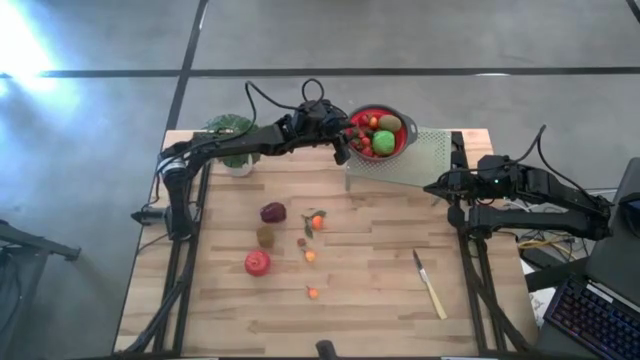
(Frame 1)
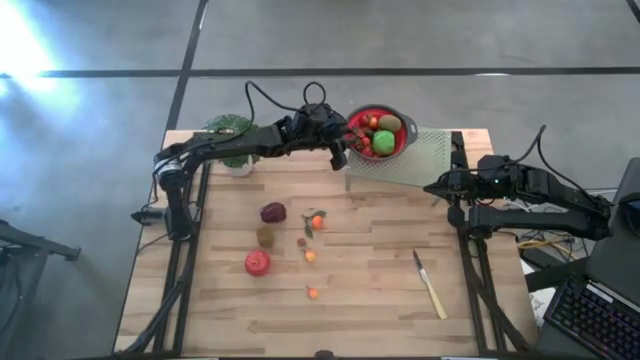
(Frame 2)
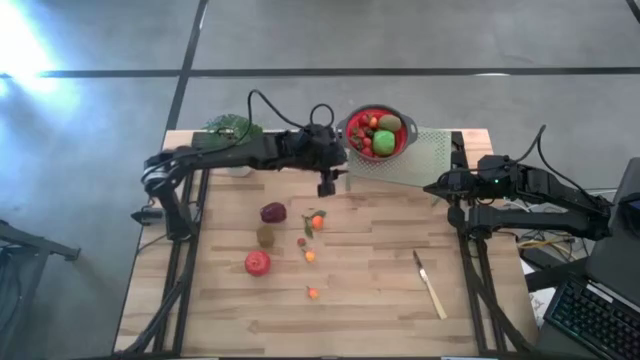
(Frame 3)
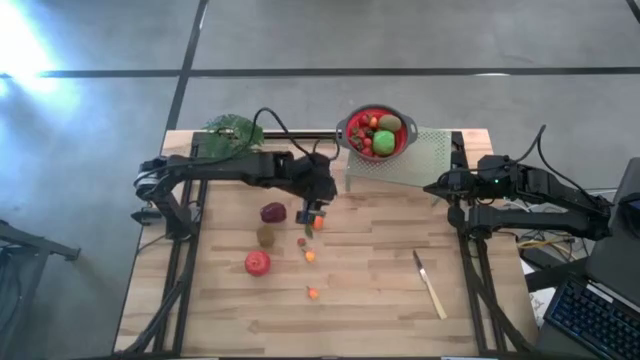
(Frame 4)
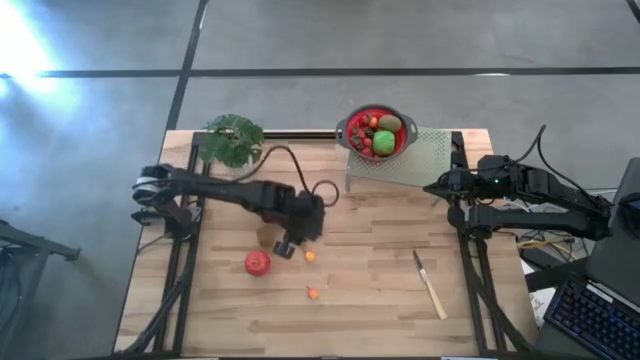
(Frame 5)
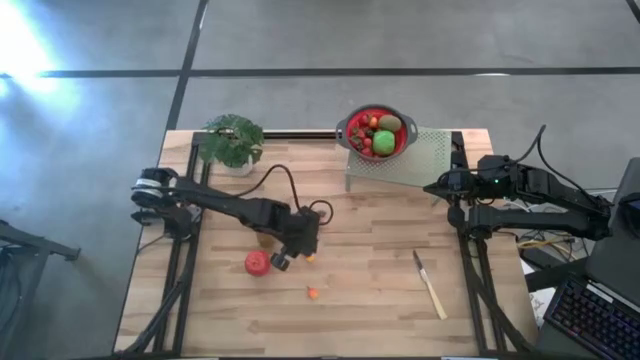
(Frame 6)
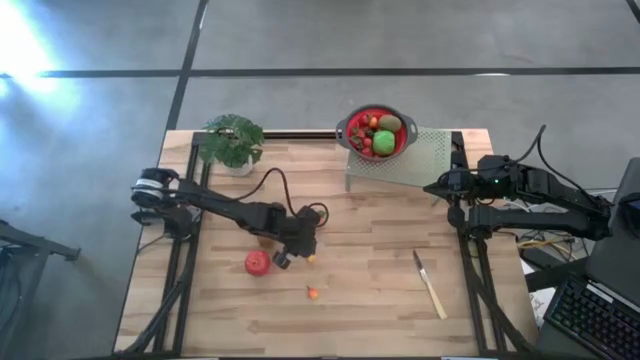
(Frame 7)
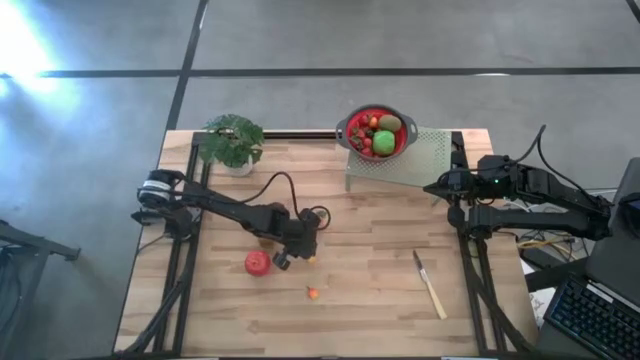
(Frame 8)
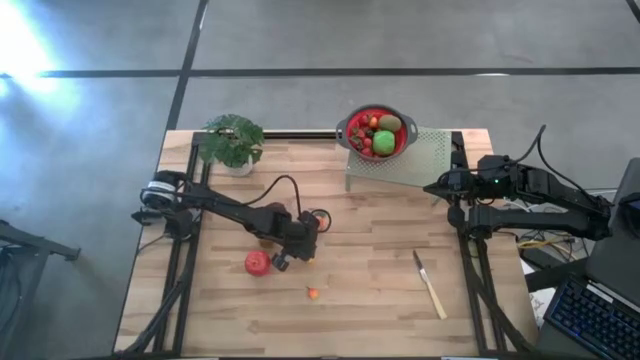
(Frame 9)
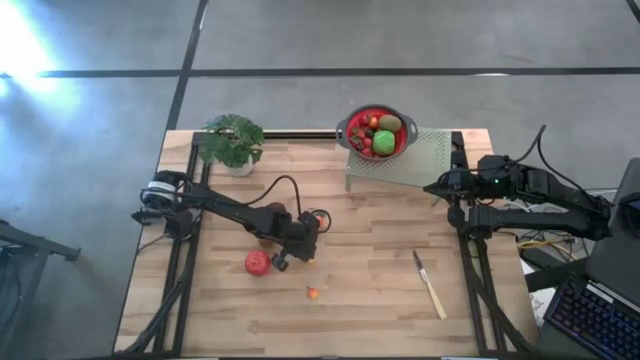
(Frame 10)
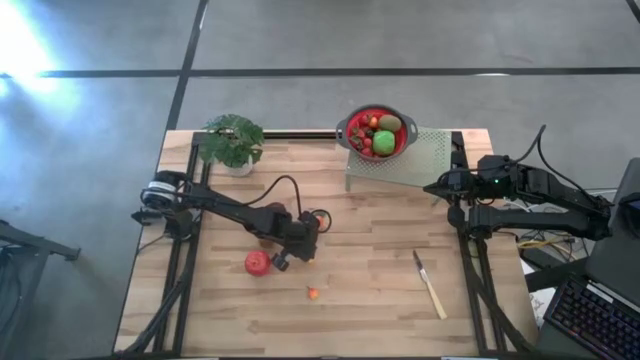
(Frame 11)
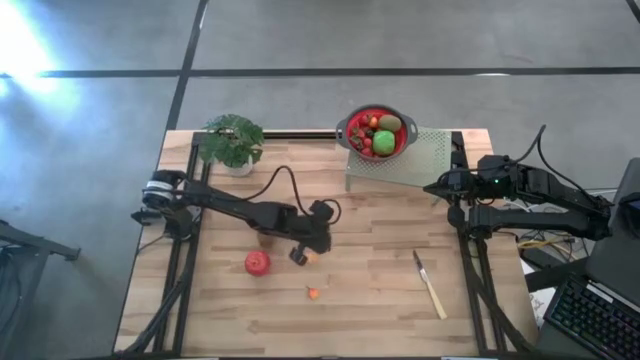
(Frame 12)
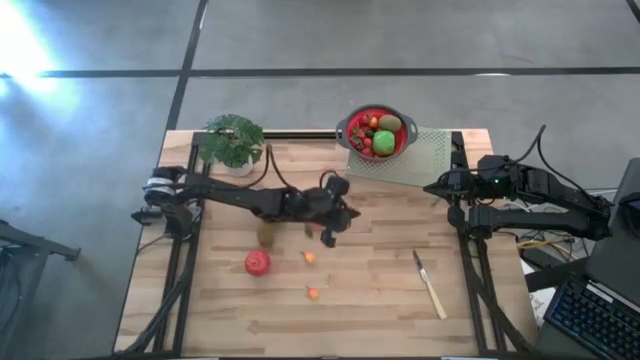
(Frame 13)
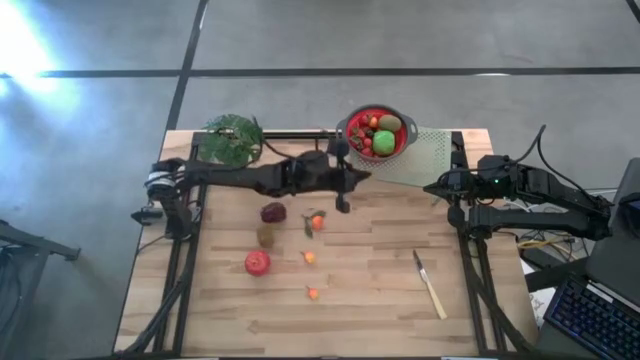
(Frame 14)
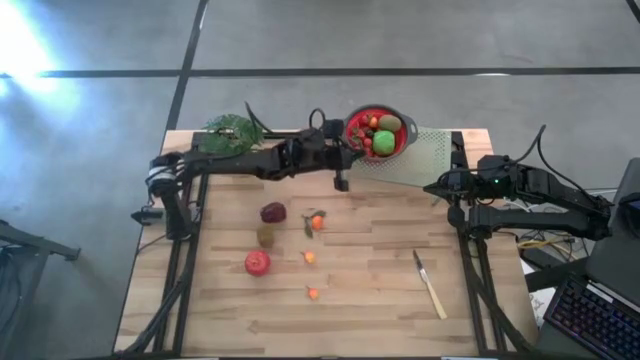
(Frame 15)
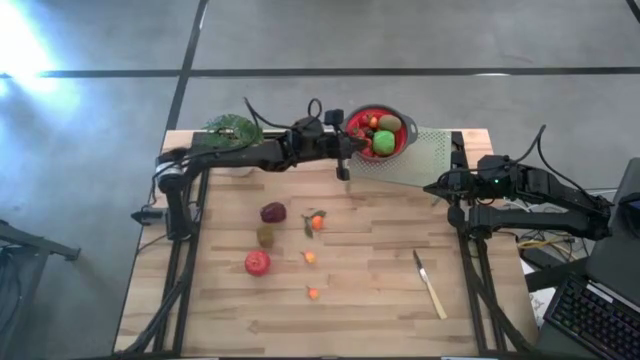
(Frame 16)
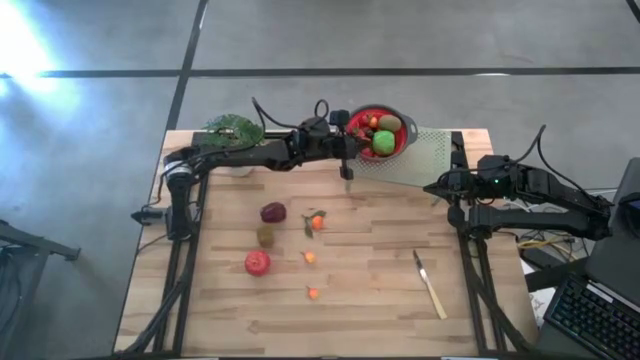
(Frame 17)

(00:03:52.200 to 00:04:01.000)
Task: Pick & Place Fruit
Put the strawberry into the strainer bowl on the shelf

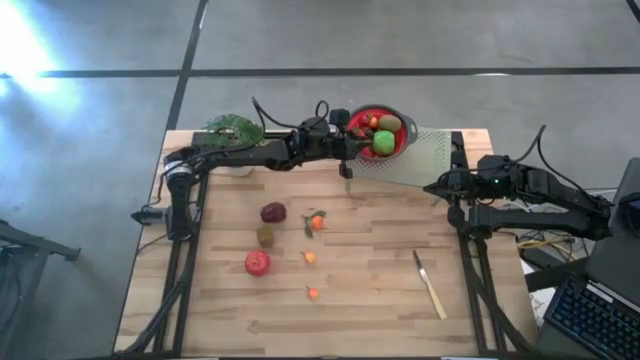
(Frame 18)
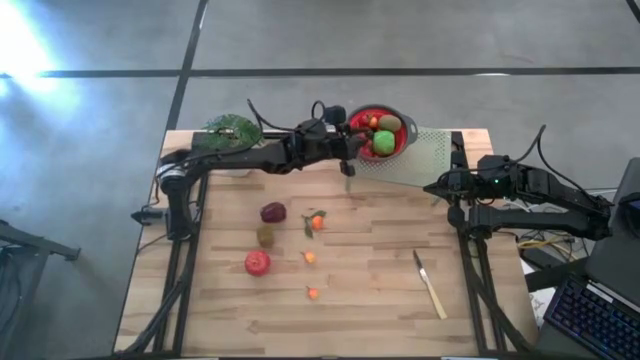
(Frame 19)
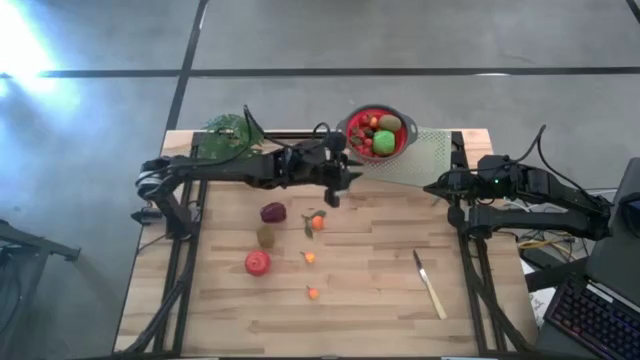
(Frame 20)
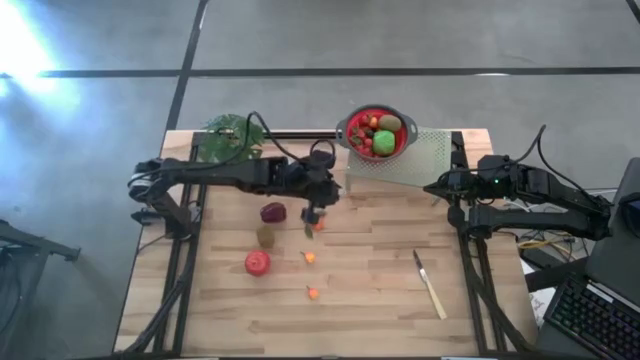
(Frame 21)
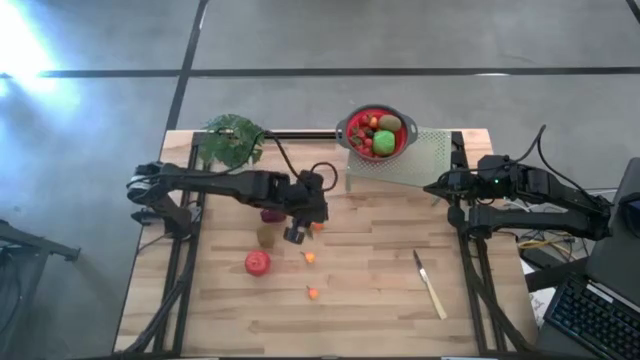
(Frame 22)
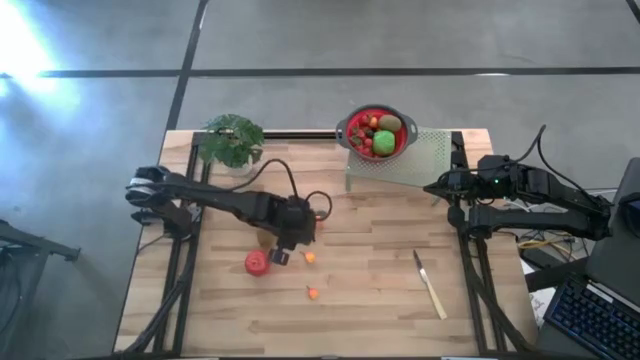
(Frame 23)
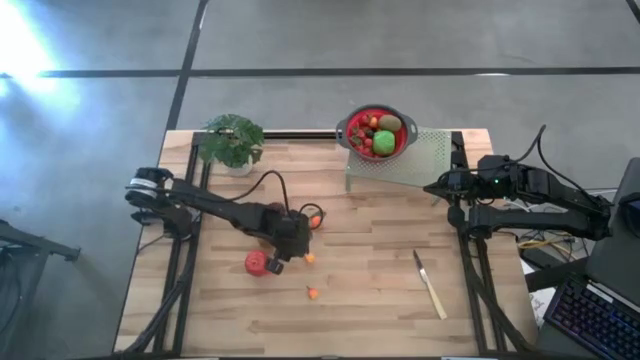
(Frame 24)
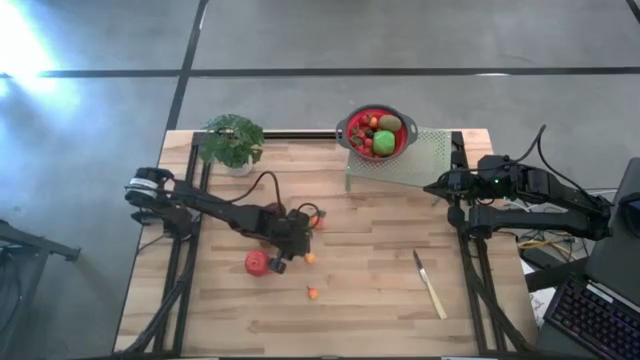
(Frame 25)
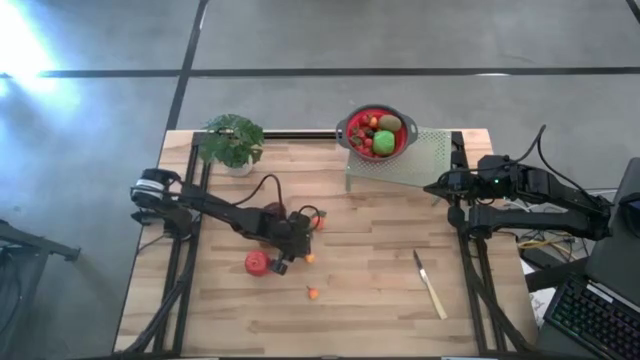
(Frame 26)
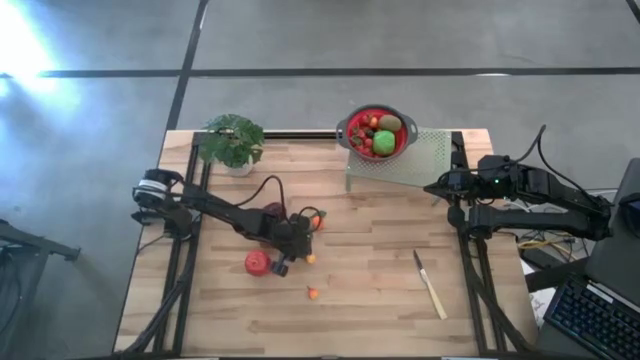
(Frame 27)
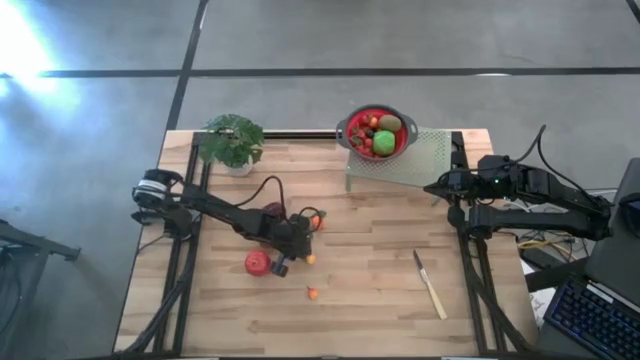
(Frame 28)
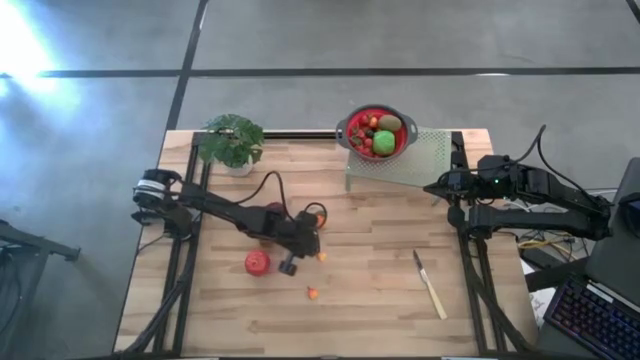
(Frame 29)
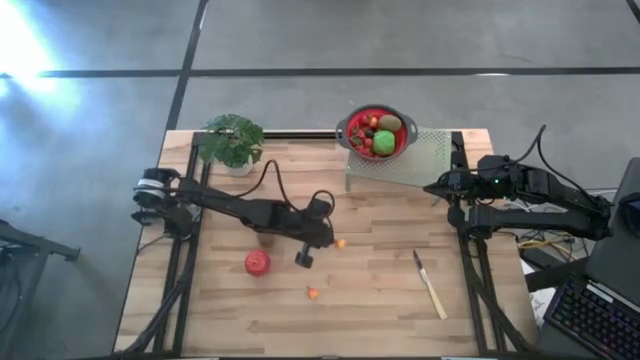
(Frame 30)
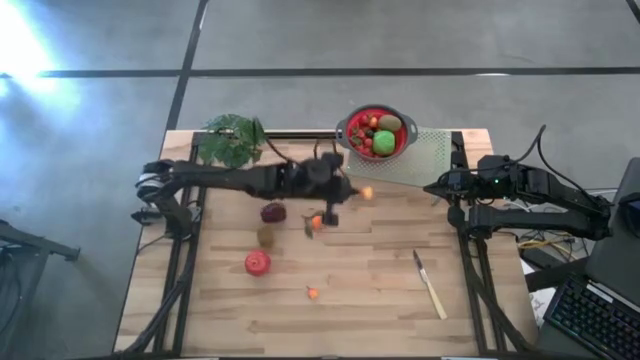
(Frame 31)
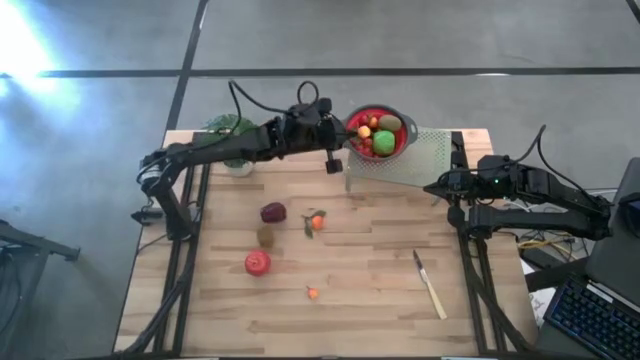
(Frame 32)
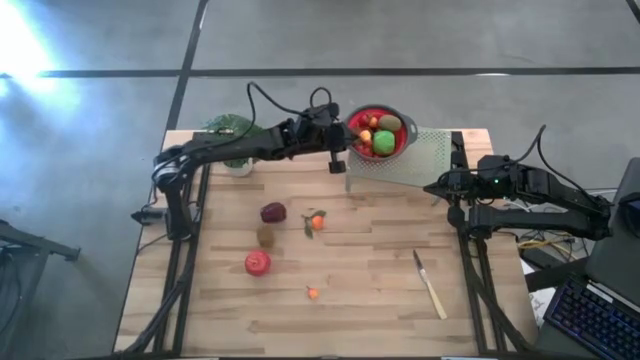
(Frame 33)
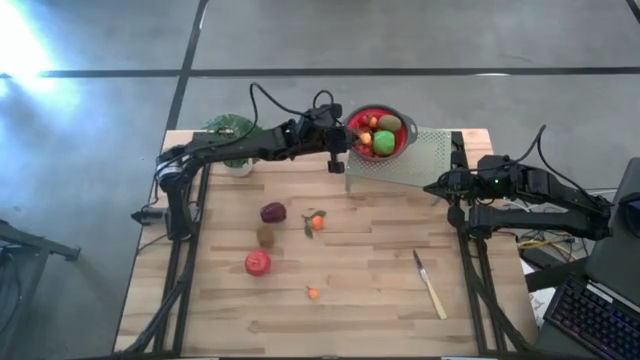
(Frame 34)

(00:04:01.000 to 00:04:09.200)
Put the pear into the strainer bowl on the shelf
